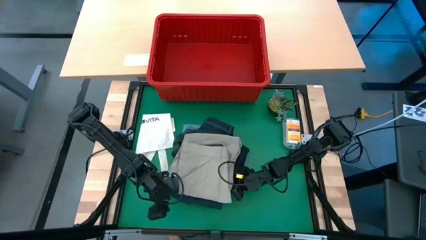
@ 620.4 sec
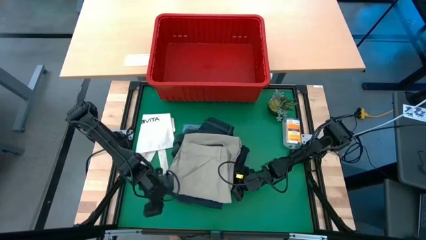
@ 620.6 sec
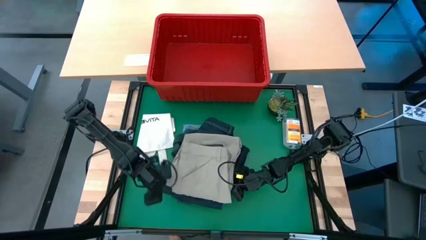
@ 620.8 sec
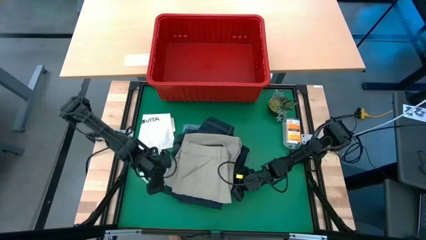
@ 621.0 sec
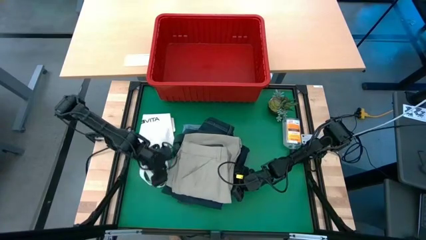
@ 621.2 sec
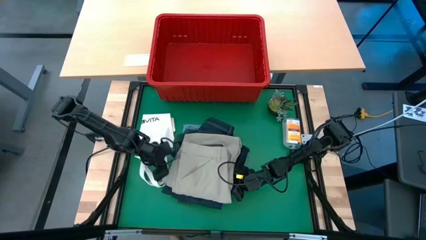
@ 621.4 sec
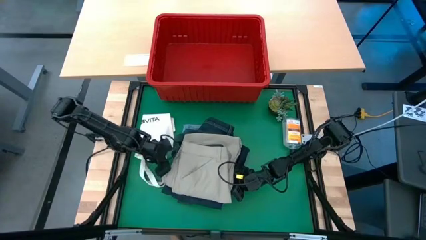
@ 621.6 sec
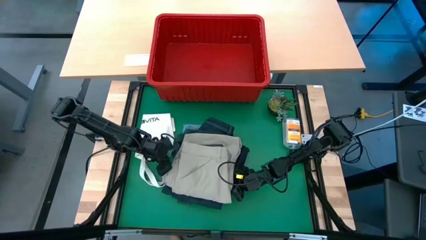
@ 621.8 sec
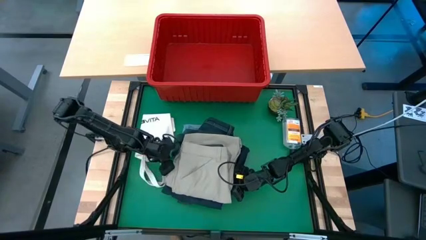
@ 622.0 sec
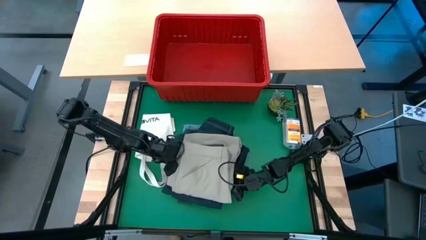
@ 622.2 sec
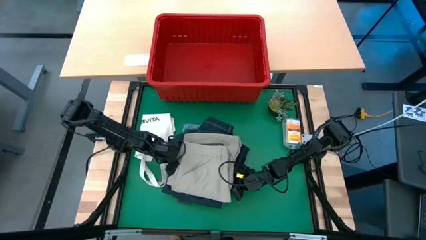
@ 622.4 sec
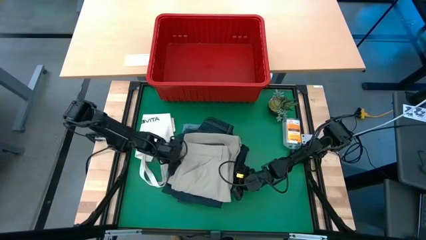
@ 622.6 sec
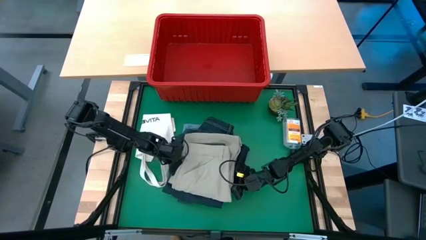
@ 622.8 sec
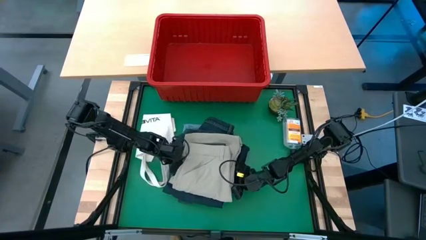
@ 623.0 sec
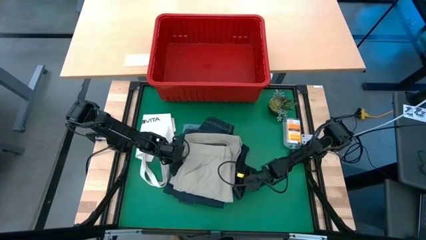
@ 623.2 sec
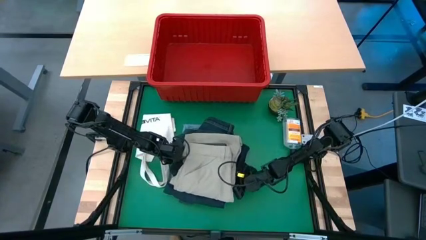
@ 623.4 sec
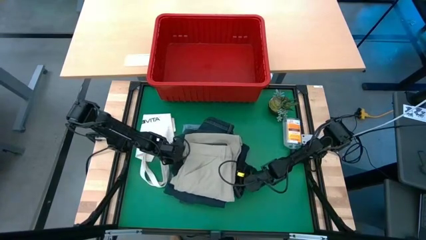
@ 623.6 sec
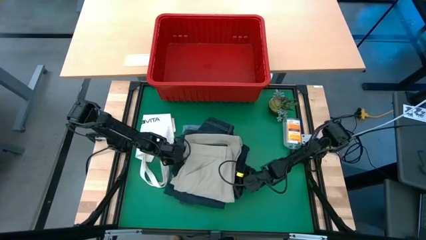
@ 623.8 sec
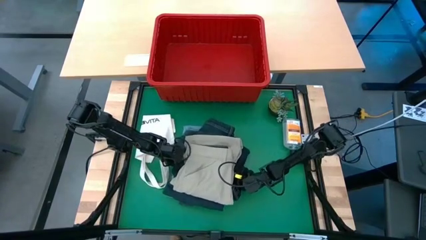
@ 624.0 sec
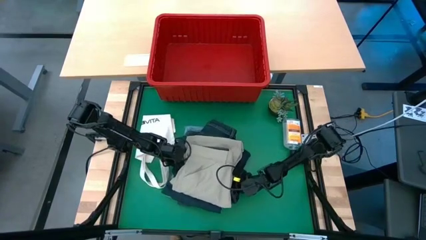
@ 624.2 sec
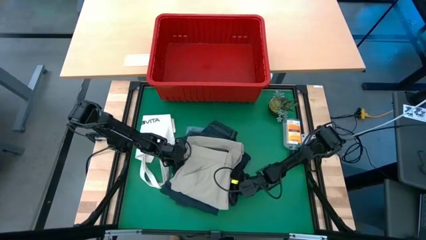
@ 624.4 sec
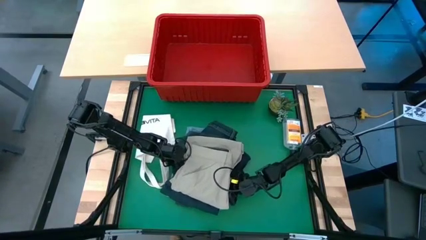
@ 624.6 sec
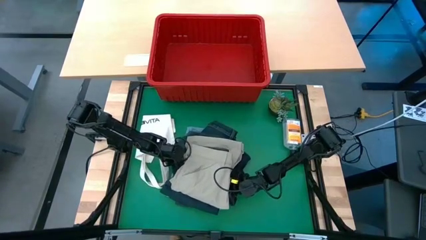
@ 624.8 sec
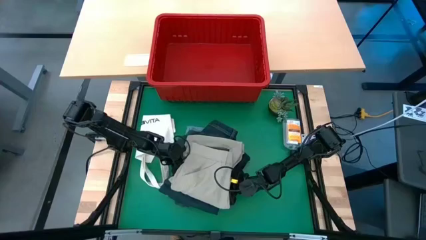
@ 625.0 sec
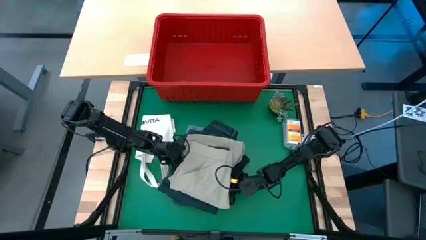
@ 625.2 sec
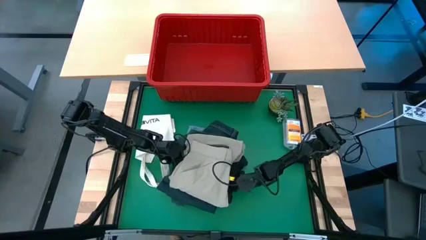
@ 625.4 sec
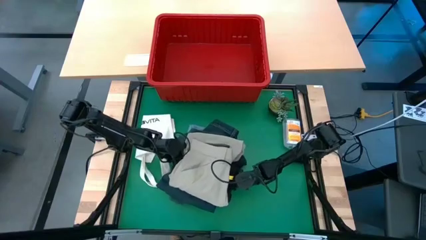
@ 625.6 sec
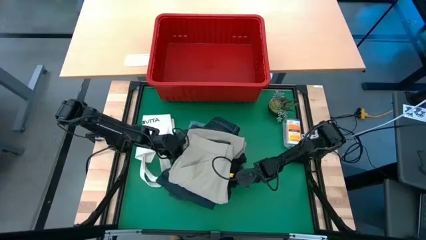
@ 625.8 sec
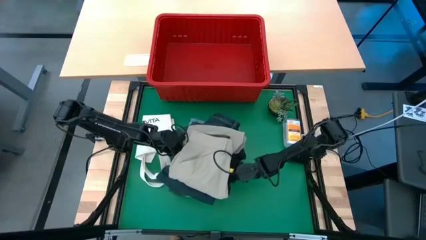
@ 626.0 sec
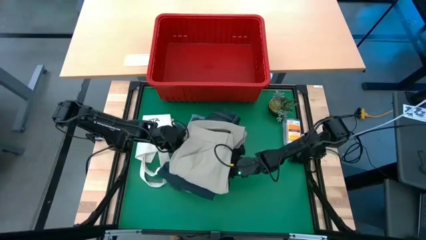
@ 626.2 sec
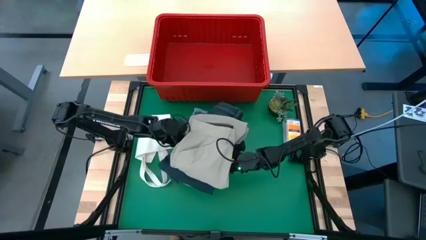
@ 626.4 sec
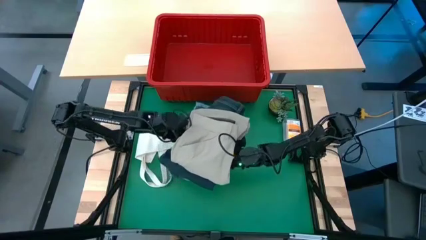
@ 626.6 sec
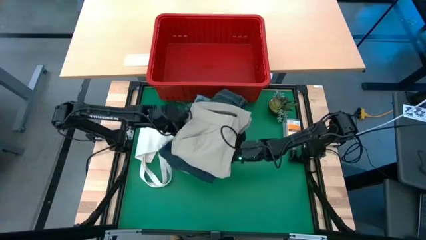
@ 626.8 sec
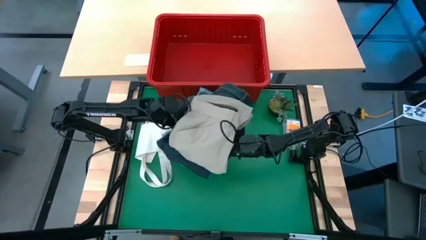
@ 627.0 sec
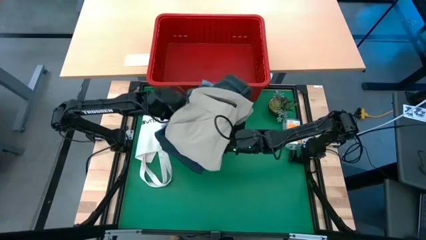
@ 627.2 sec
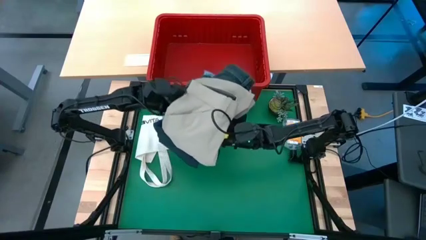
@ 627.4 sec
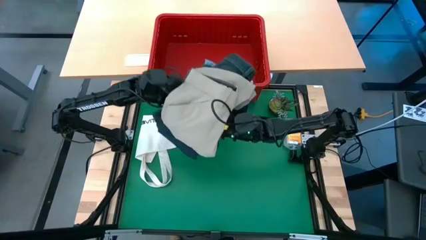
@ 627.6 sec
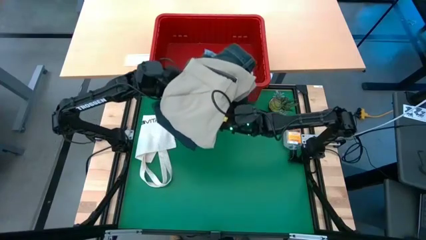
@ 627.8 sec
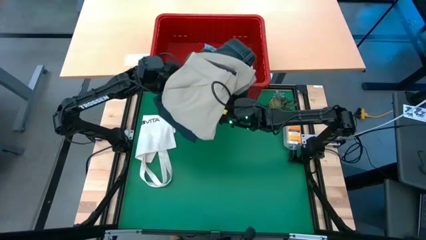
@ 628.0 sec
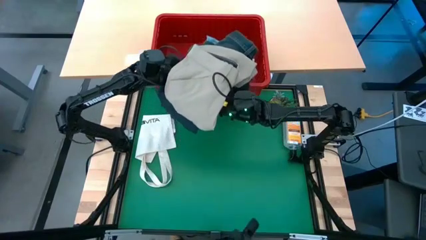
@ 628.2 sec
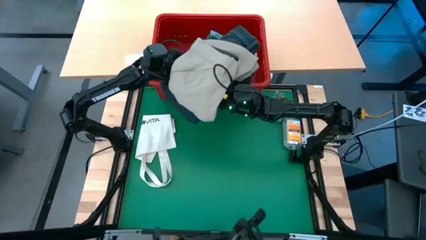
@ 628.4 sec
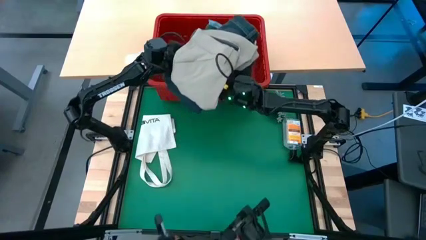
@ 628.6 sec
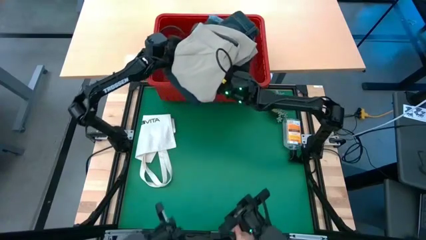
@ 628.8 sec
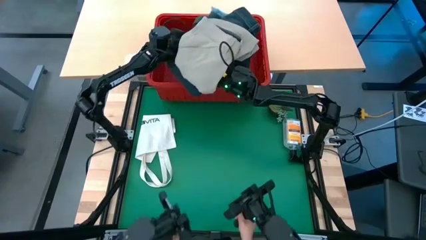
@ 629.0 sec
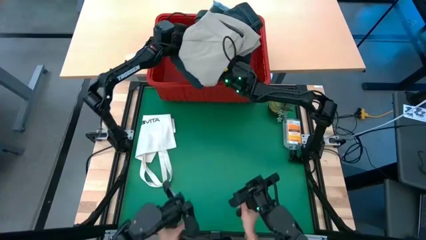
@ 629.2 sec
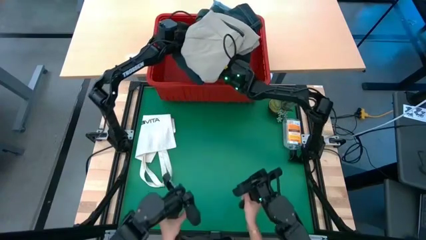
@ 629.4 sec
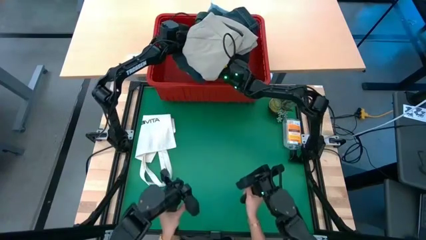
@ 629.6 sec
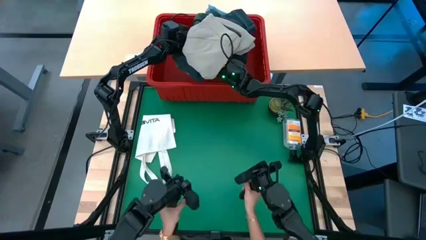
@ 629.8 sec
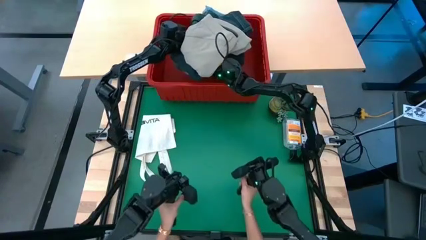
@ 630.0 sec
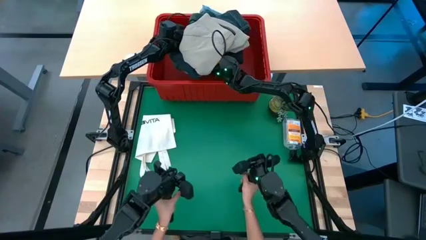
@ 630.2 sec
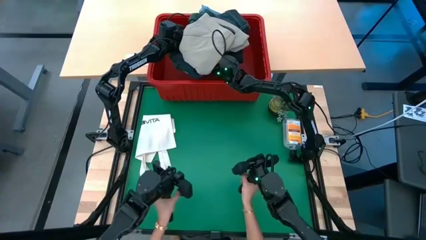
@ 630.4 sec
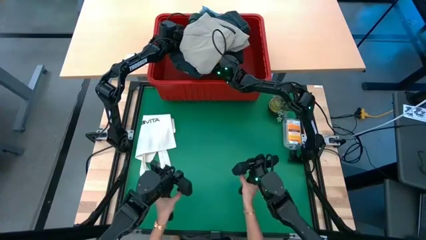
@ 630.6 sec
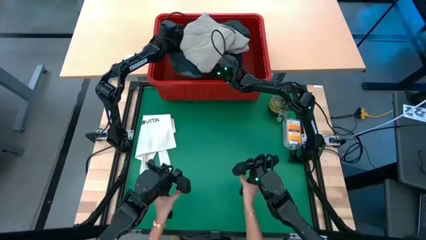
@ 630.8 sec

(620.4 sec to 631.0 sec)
Task: Fold Laundry from Bin
Put the stacked clothes into the red bin

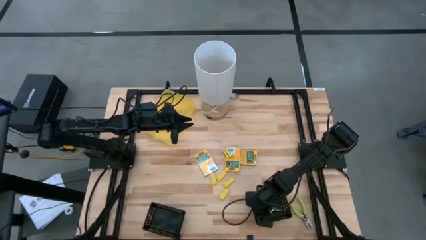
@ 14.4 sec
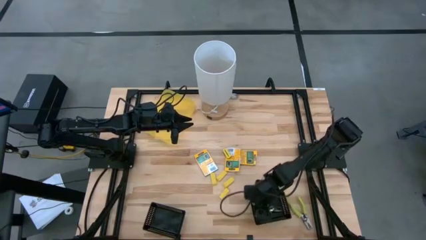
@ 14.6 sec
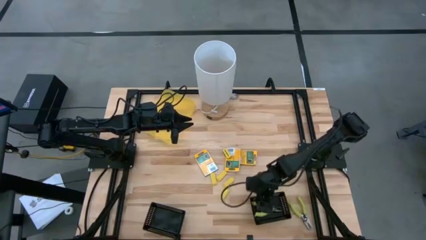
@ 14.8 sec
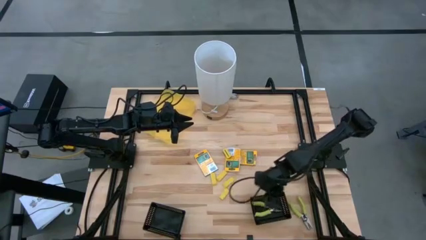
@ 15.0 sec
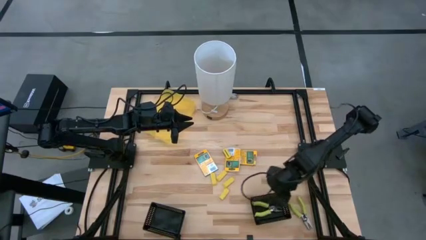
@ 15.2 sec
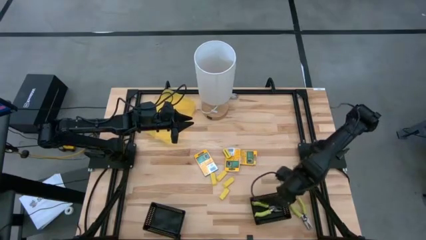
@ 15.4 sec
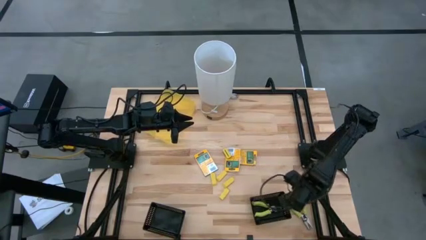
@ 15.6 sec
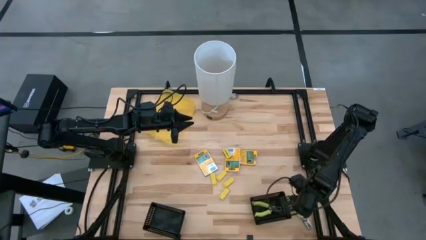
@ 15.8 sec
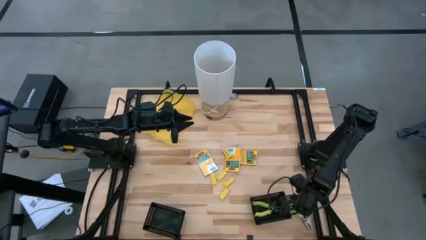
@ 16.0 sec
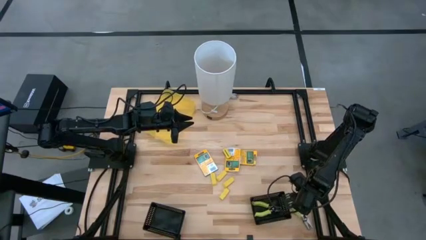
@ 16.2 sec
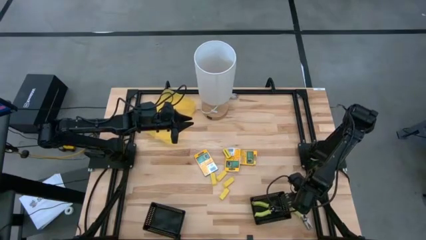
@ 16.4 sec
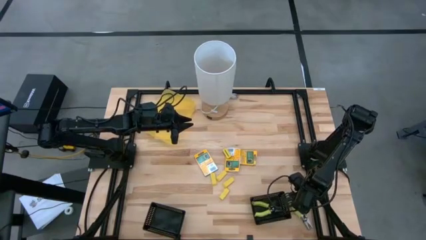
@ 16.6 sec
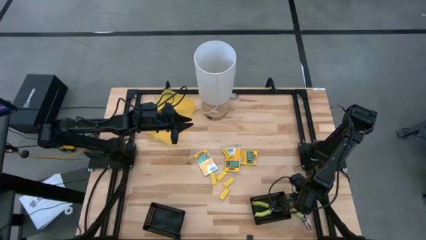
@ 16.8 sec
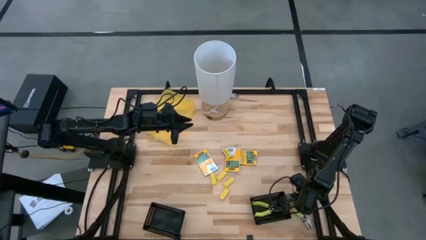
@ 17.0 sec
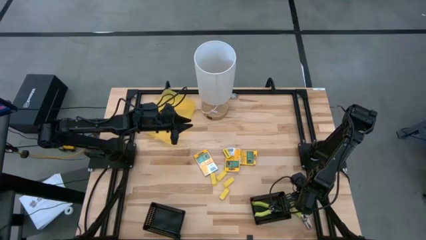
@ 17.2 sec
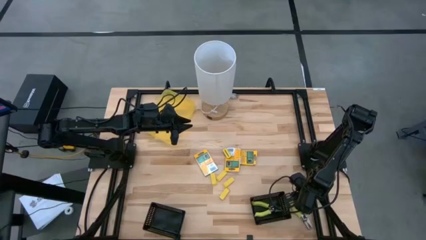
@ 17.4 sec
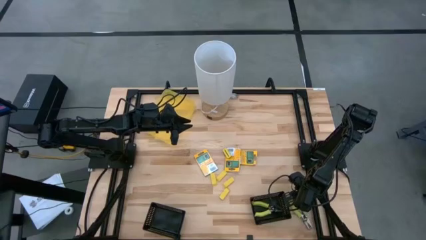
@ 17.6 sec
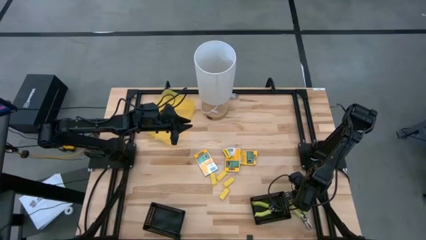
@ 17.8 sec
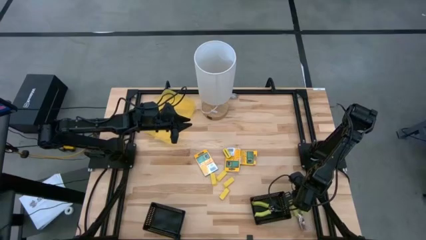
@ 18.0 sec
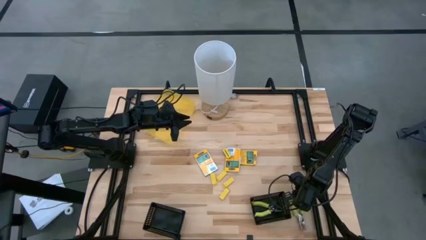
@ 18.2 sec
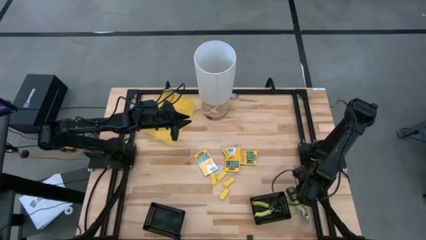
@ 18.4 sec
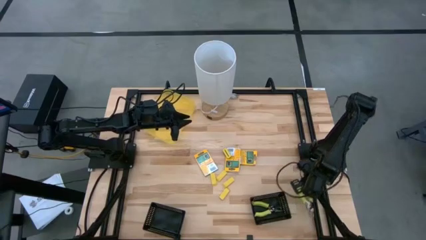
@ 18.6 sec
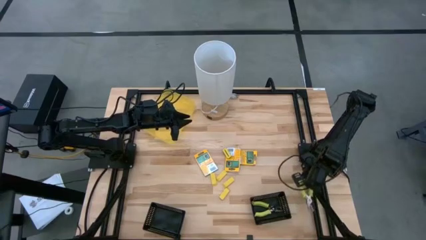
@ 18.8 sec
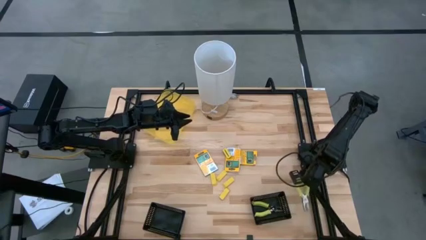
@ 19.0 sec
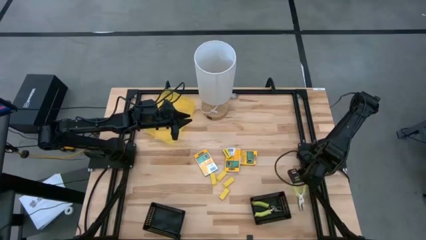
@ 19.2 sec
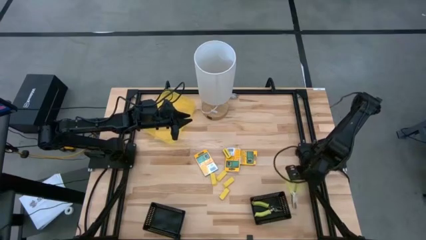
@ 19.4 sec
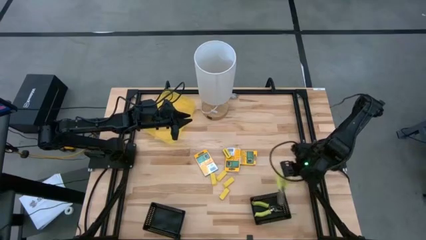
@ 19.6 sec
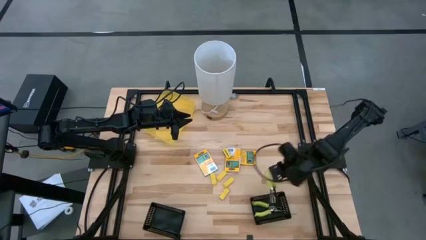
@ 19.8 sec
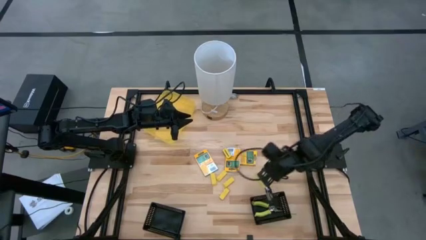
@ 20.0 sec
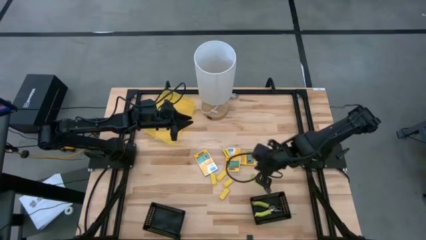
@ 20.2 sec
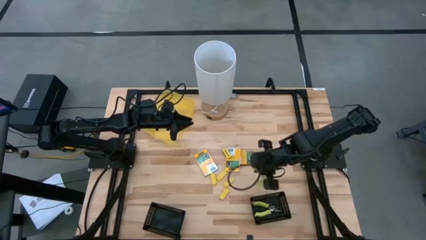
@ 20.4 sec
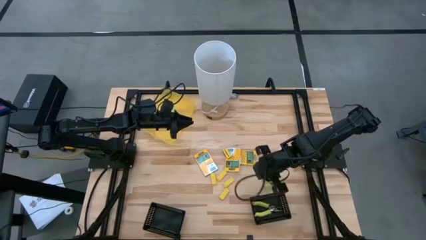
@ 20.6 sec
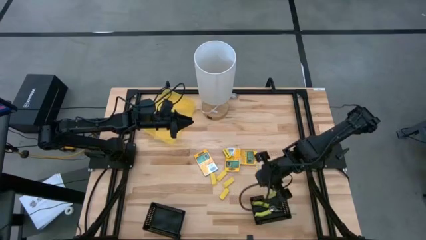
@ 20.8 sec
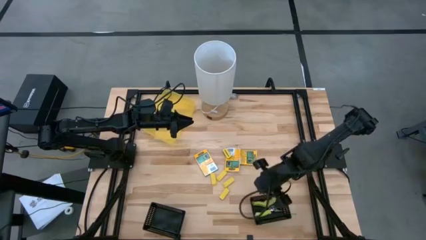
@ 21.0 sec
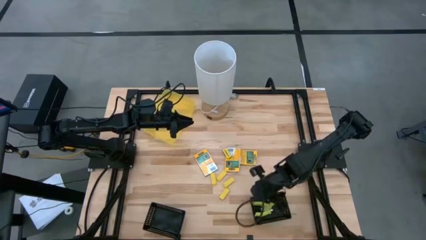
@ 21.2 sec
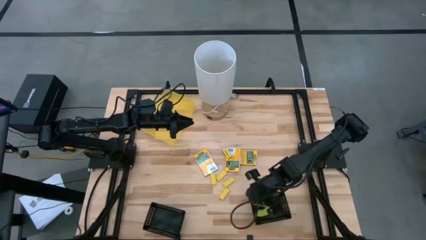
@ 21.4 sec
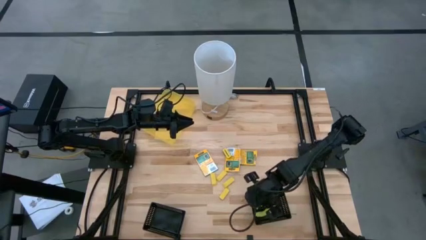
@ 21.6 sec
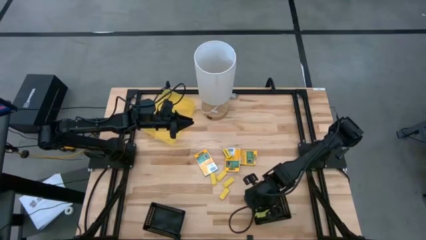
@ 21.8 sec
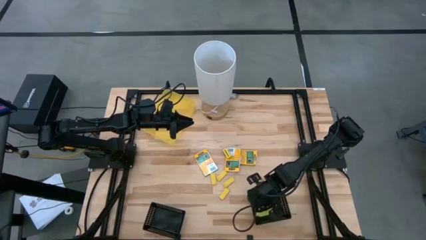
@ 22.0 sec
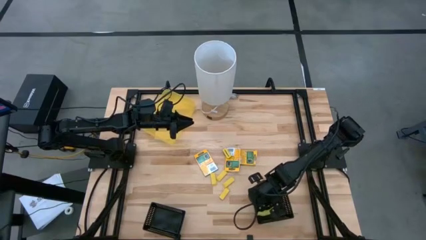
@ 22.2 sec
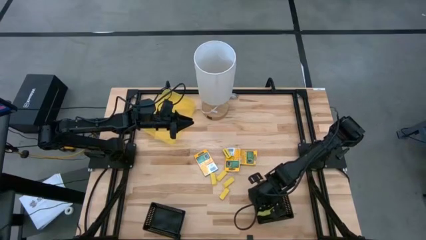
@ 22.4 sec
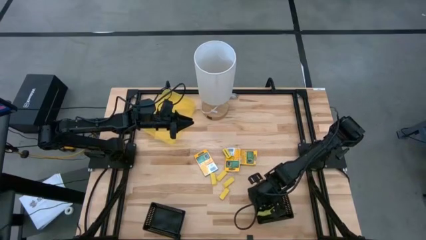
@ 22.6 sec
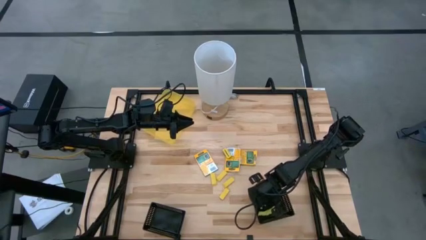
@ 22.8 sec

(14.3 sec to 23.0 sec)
Task: Pick & Place School Supplies
Put the punch pliers into the bottom right black bin
